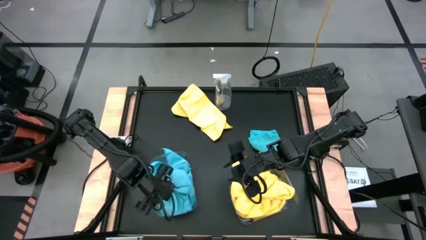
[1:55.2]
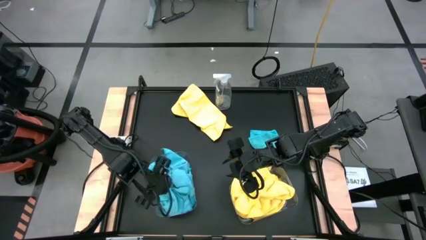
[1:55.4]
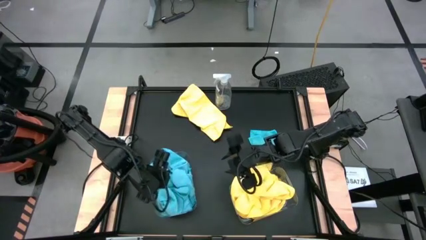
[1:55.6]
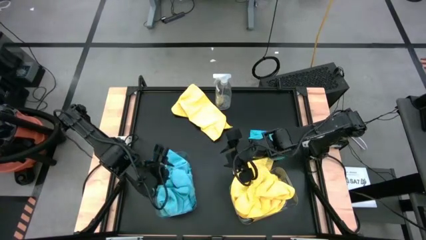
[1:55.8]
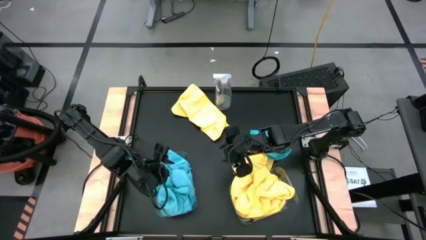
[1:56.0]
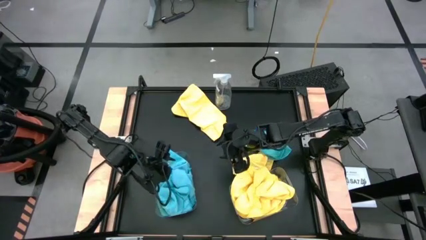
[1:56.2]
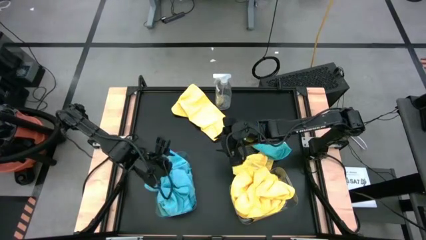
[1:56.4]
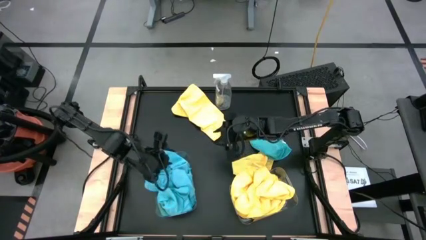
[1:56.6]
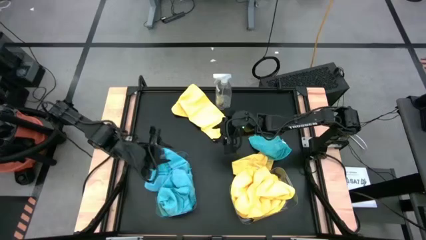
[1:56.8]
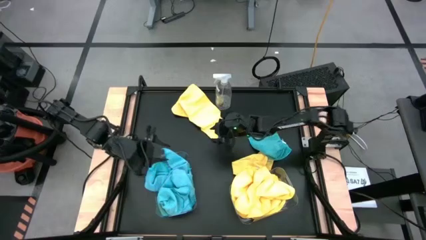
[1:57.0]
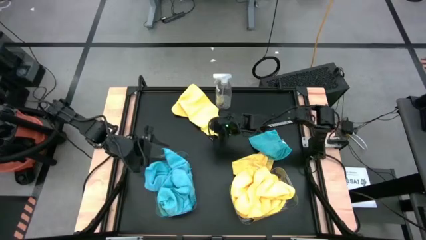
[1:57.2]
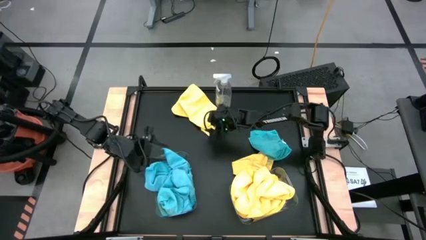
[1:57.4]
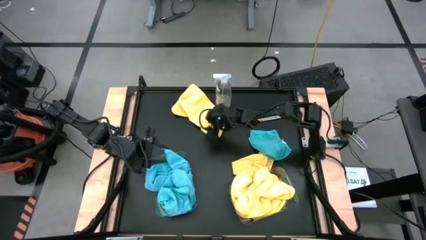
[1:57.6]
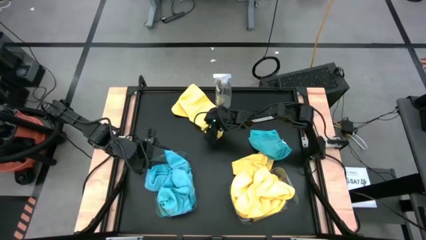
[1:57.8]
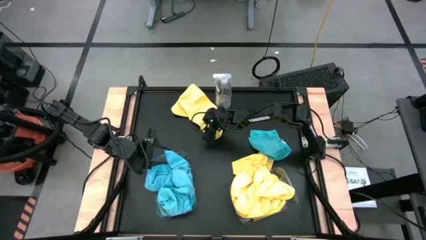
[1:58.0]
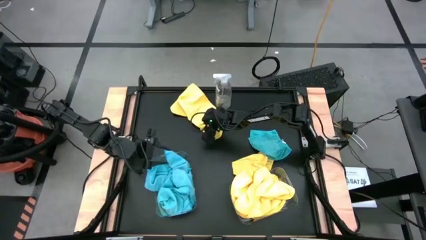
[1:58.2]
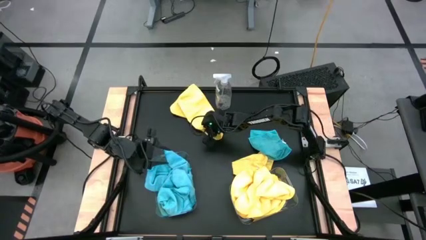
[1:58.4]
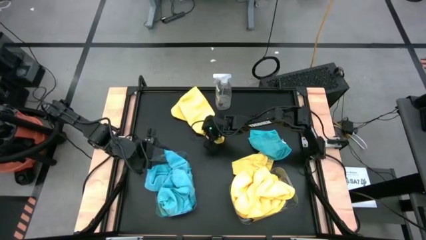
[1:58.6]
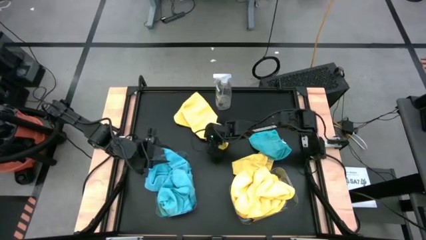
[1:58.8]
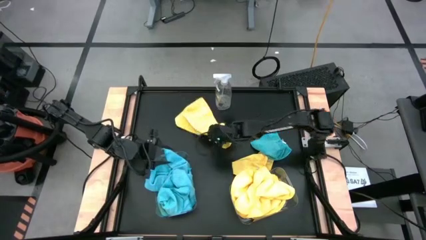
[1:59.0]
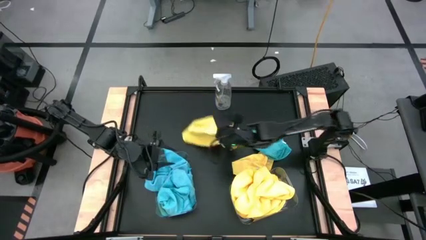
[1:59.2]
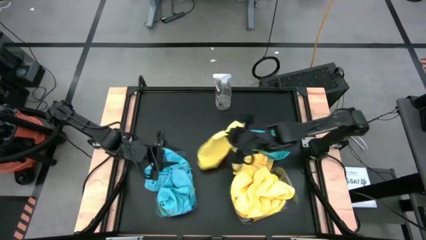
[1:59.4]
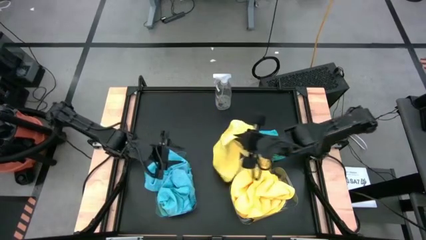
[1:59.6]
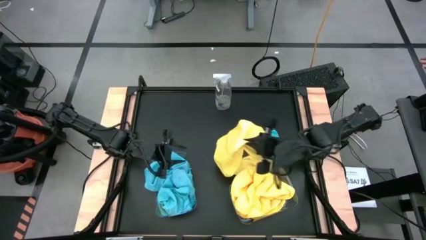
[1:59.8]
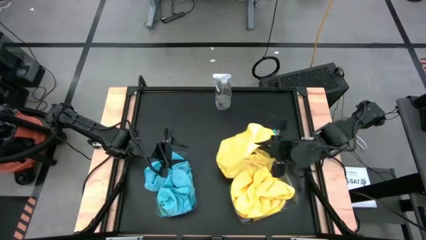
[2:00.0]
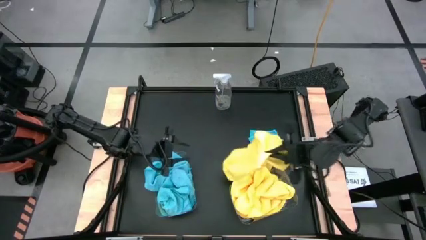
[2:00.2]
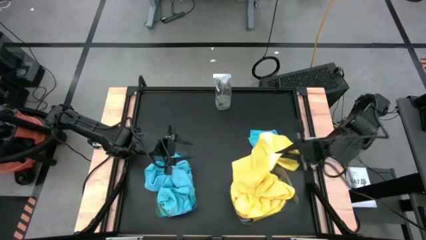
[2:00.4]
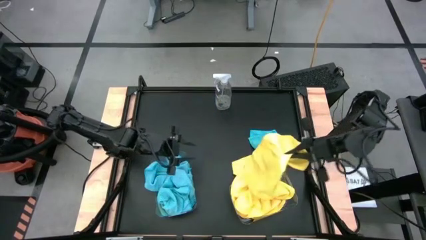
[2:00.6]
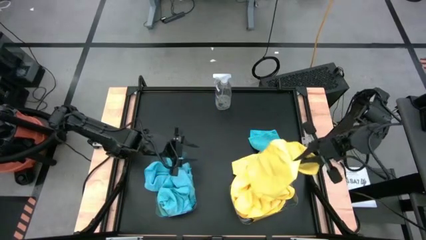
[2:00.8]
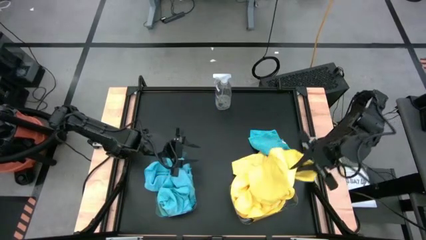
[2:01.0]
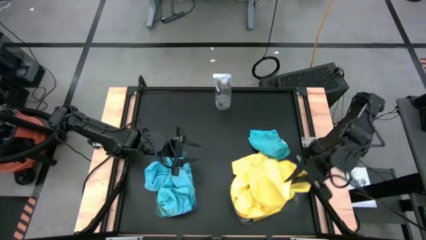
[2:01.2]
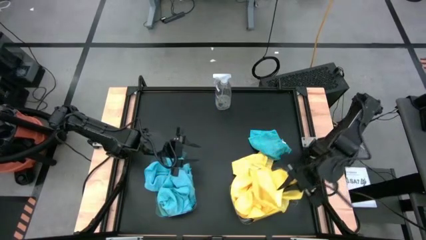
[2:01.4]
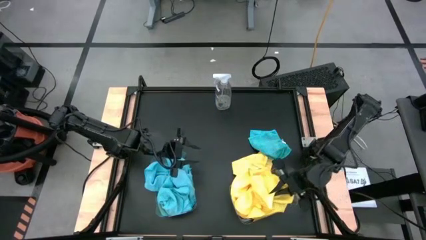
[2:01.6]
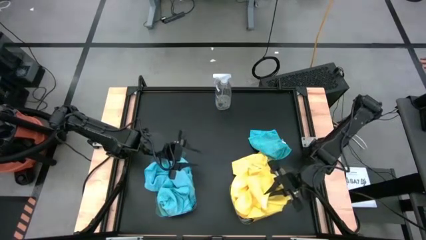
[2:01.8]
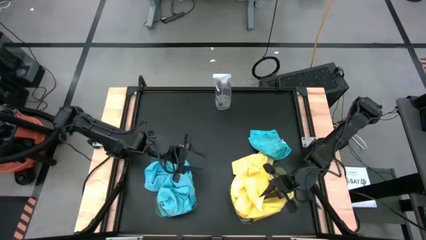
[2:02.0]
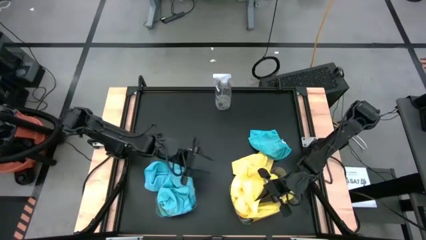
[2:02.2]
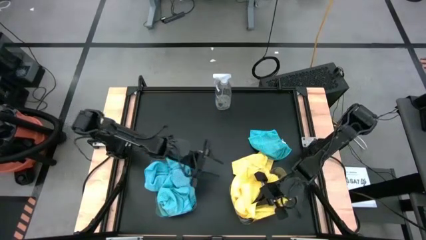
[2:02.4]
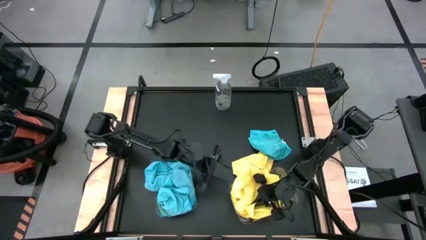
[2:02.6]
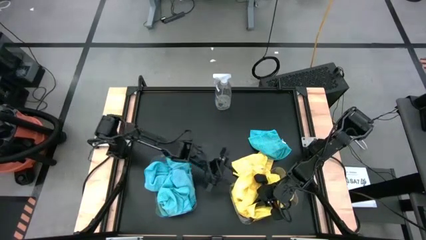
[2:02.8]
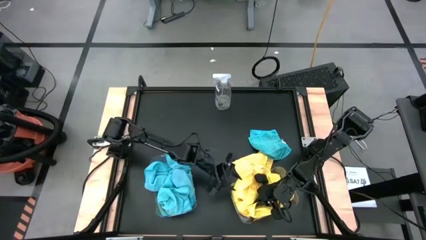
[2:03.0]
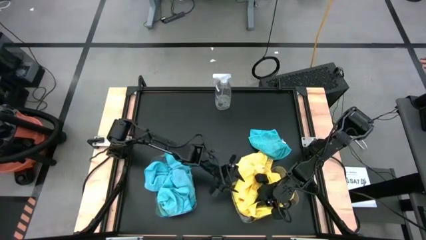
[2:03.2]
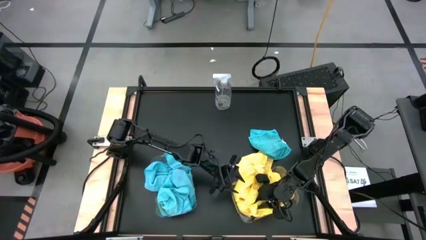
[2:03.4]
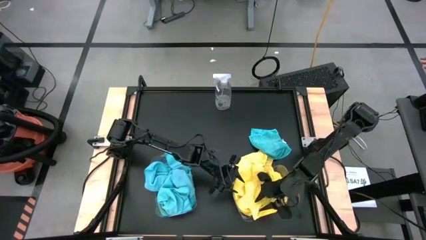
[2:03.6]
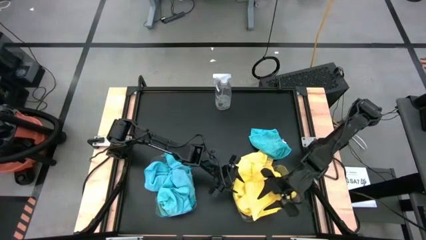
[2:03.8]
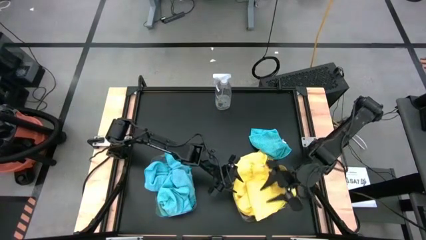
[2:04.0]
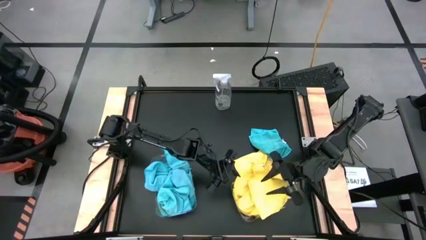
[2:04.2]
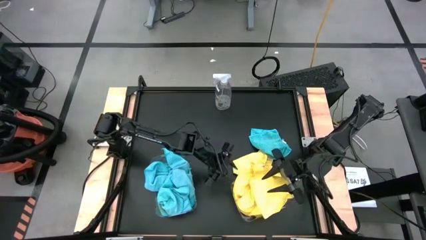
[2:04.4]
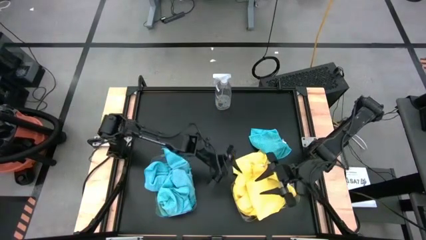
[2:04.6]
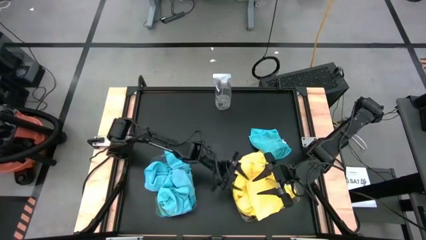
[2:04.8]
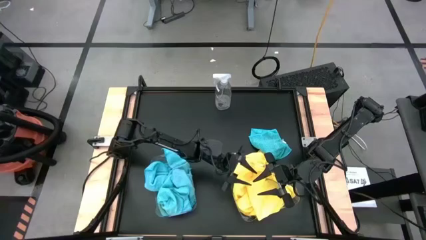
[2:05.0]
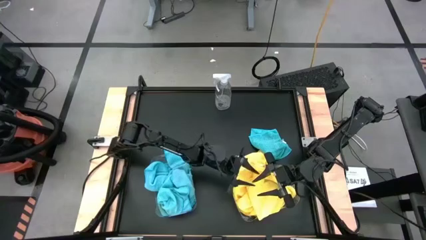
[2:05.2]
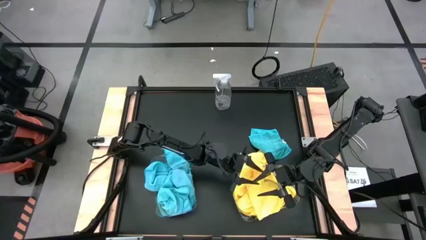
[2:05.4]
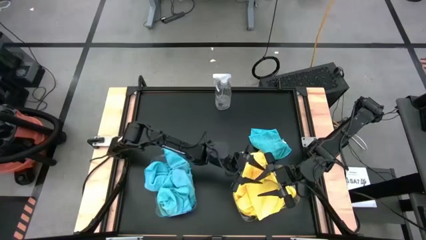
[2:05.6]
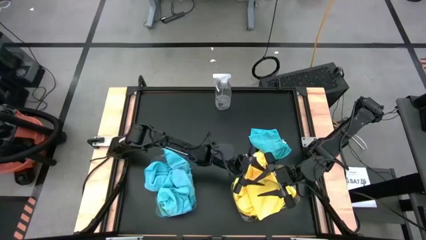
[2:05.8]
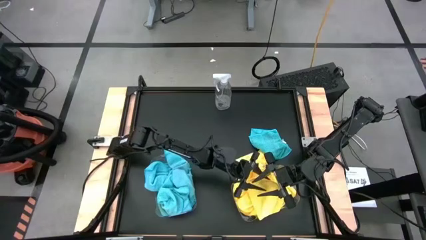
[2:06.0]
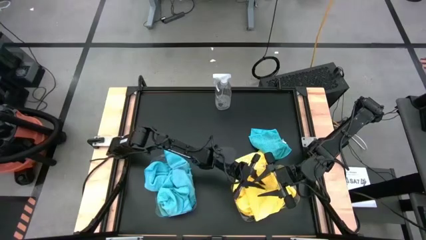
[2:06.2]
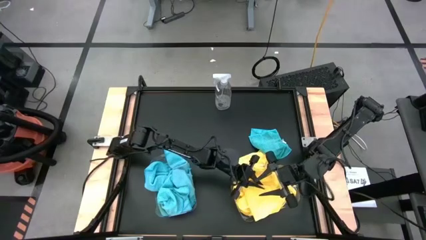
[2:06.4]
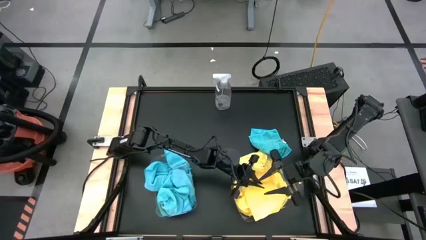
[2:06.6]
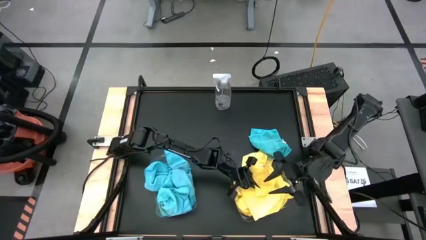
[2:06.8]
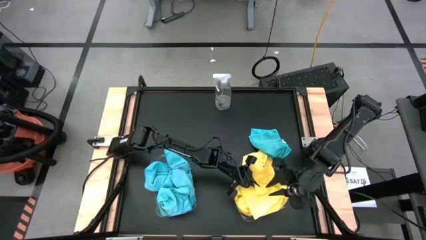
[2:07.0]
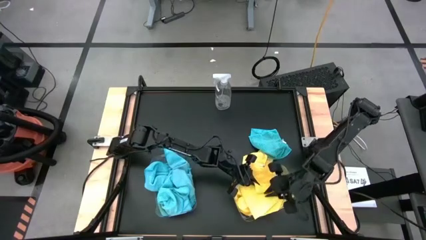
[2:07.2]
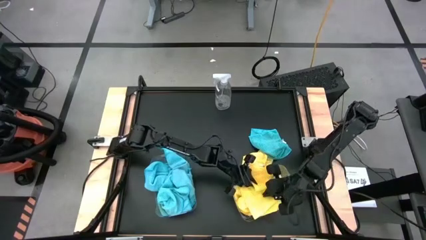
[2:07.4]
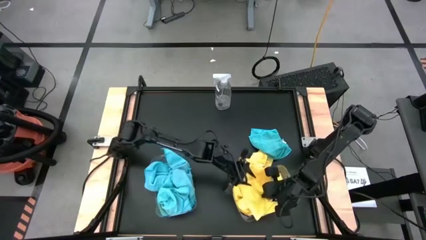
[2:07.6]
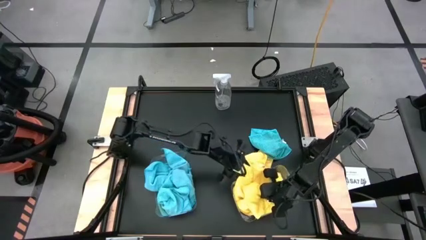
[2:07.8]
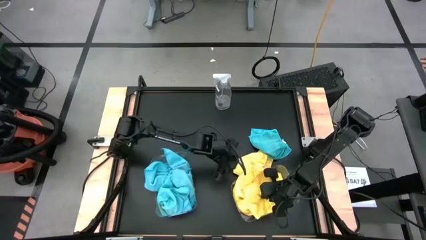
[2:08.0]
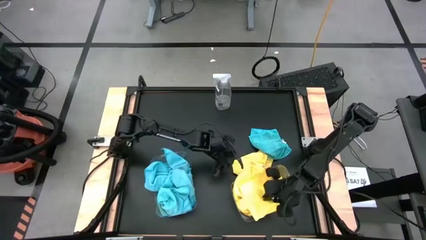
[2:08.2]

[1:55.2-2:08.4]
Task: Sort microfiber towel by color & place in baskets
Put the yellow microfiber towel into the right transparent bin

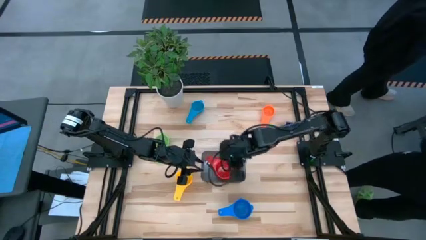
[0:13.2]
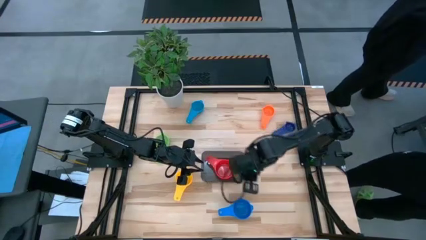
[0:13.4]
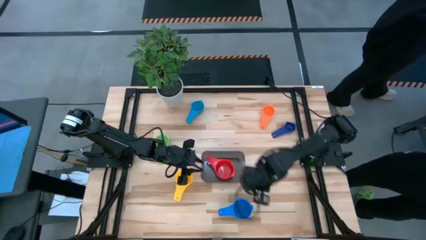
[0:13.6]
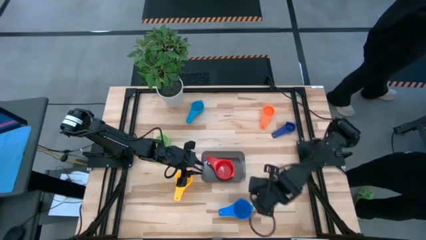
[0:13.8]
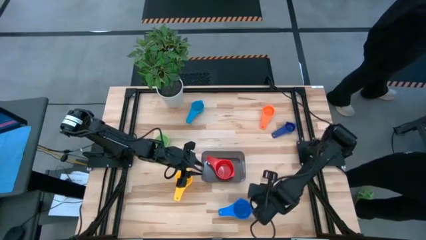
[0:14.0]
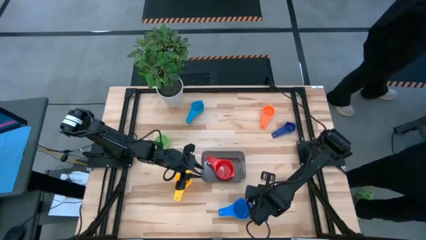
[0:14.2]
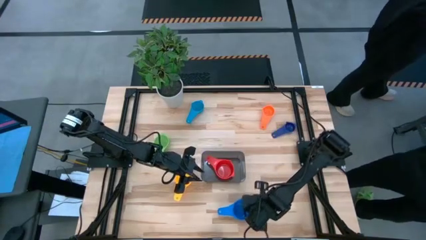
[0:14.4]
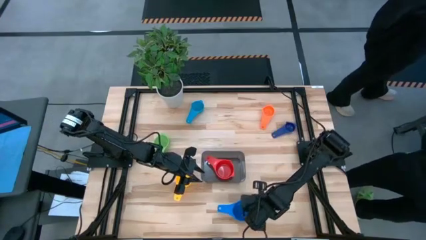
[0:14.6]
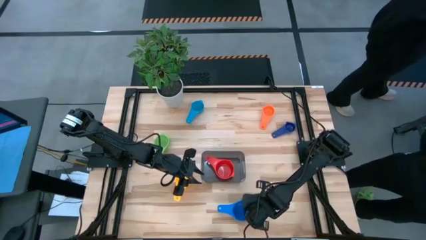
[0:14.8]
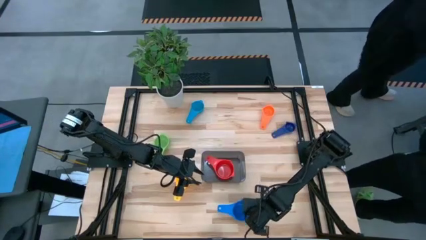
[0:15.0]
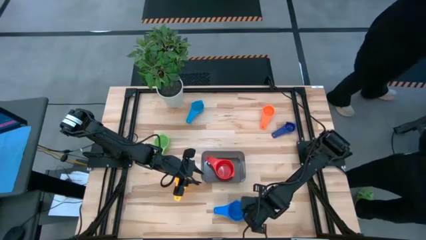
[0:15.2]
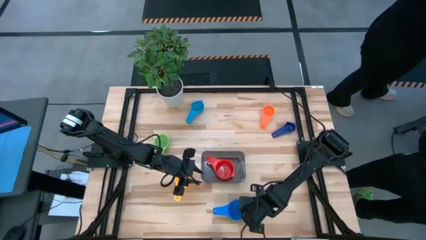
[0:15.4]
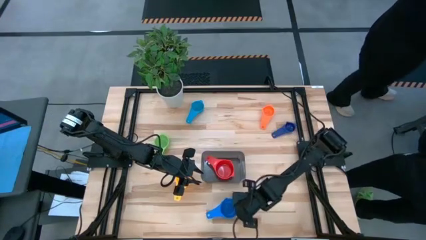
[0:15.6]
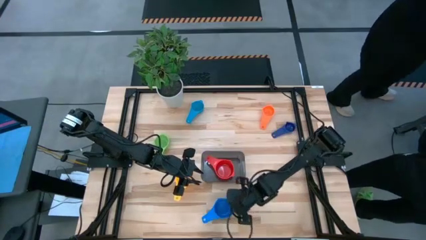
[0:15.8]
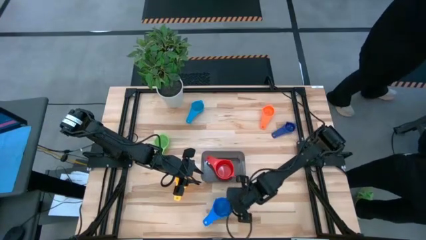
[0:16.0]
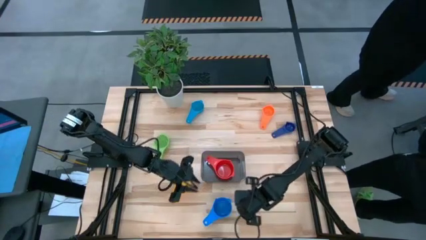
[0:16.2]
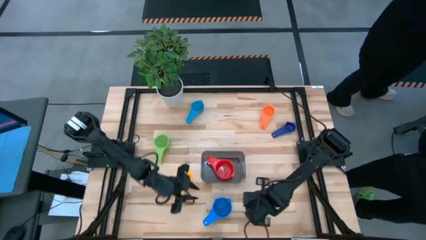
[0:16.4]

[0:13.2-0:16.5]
Task: Nest measuring cups in basket
Adjust the blue measuring cup
